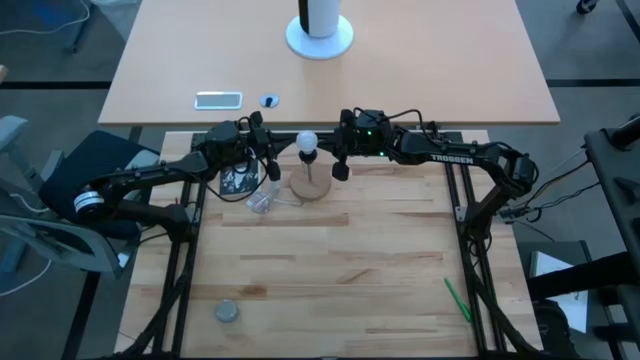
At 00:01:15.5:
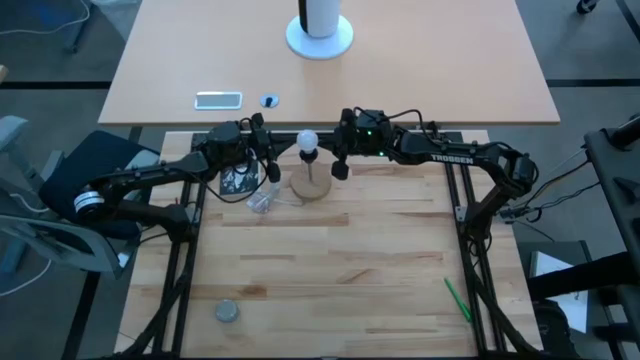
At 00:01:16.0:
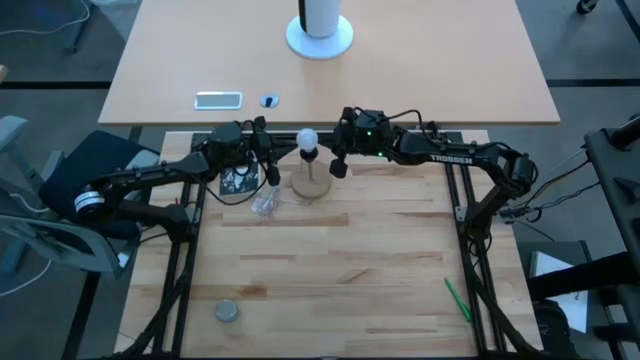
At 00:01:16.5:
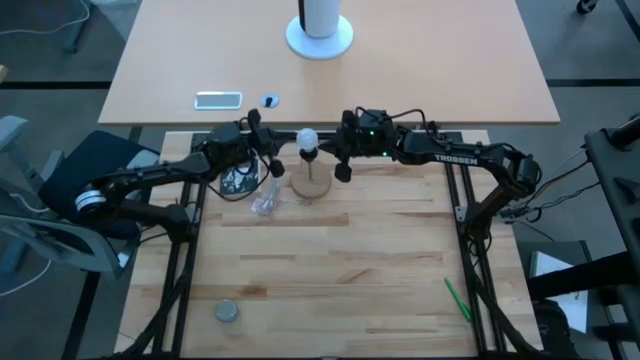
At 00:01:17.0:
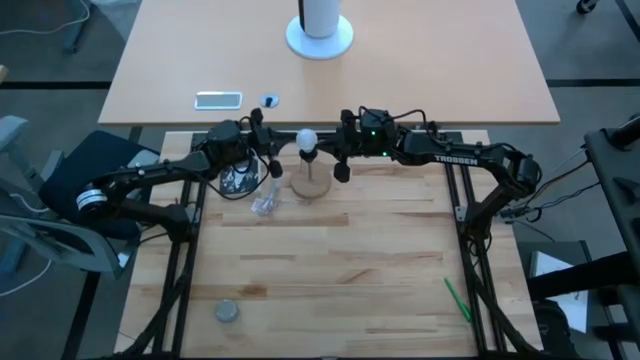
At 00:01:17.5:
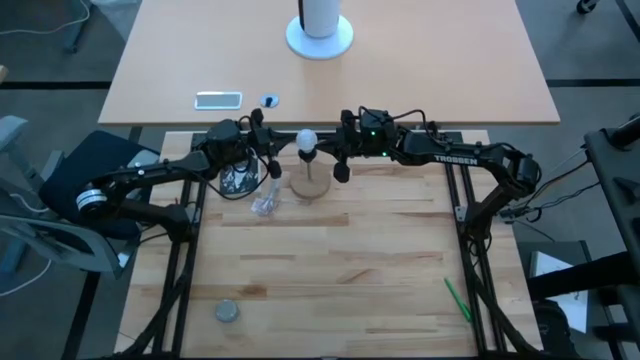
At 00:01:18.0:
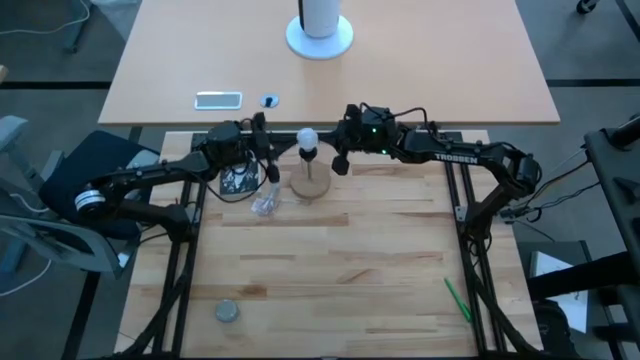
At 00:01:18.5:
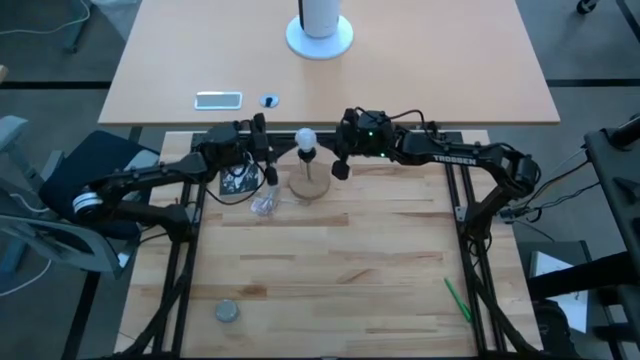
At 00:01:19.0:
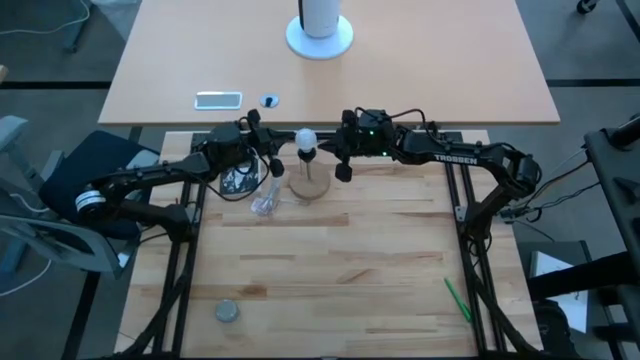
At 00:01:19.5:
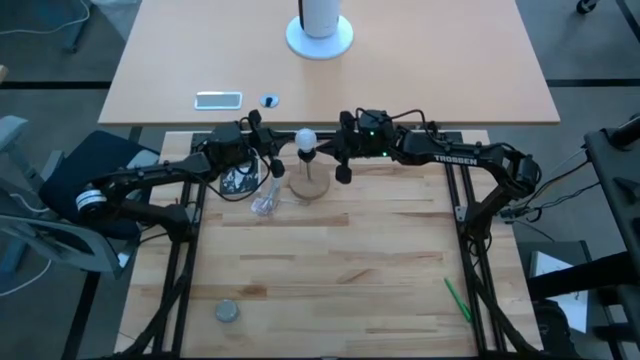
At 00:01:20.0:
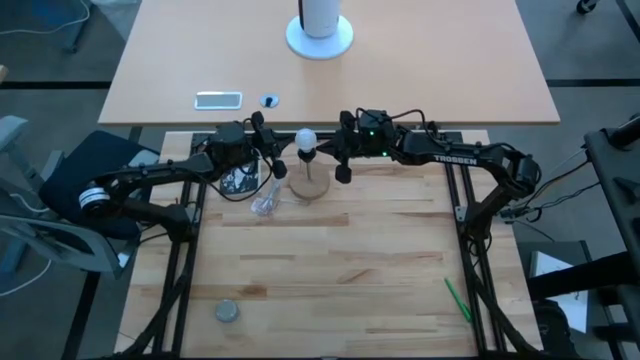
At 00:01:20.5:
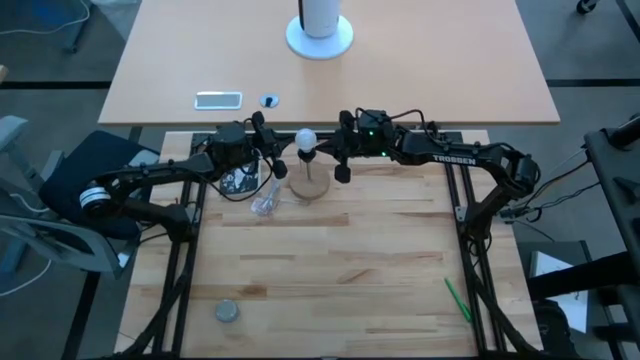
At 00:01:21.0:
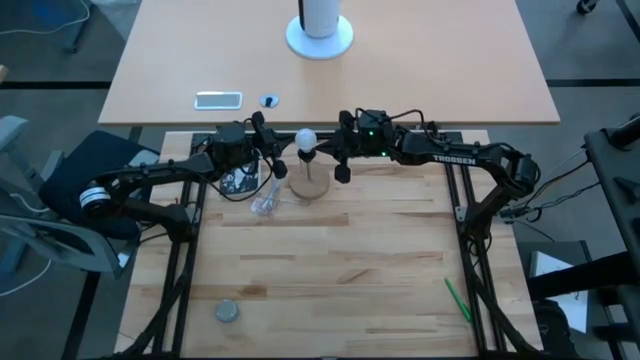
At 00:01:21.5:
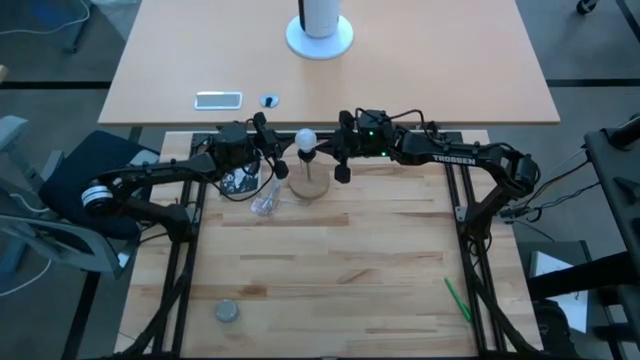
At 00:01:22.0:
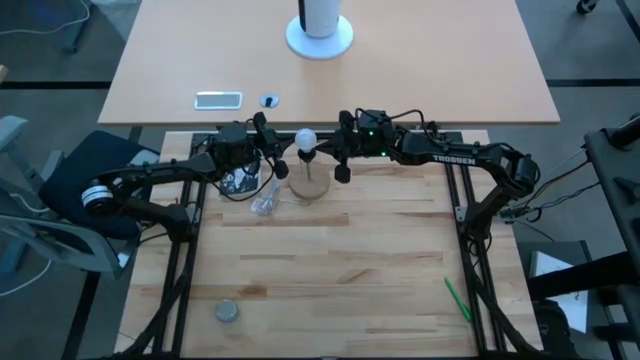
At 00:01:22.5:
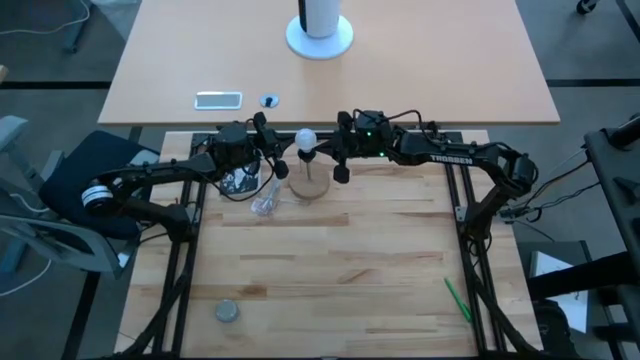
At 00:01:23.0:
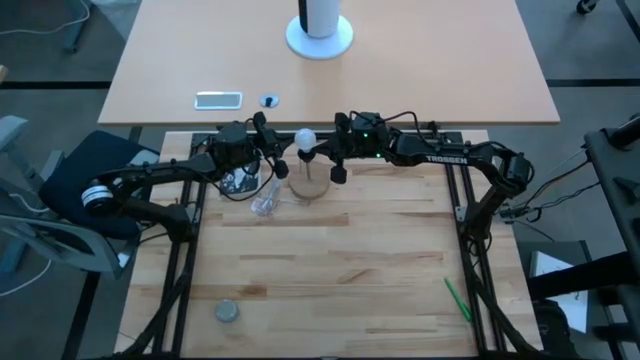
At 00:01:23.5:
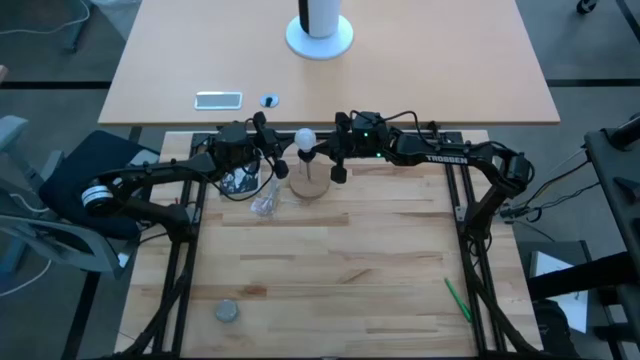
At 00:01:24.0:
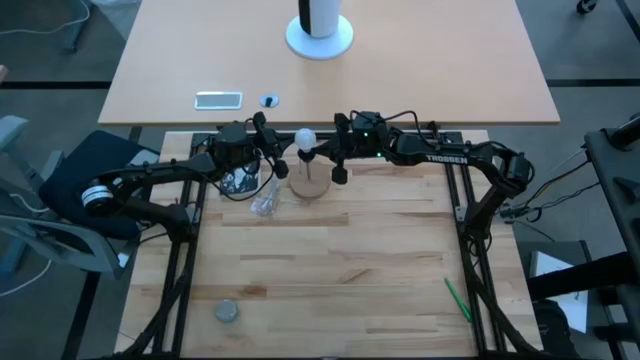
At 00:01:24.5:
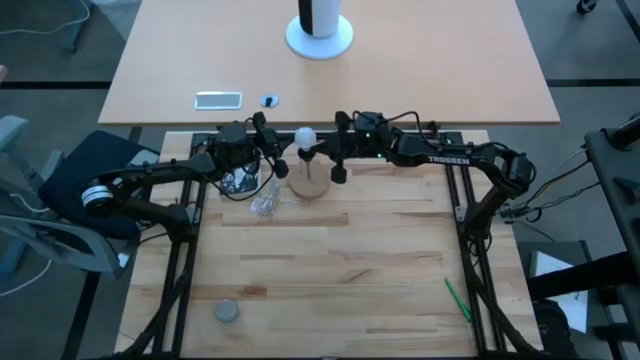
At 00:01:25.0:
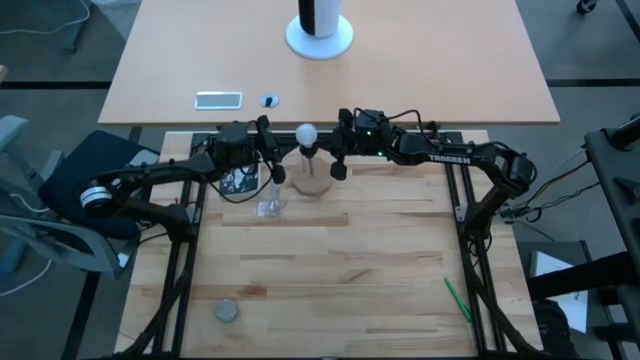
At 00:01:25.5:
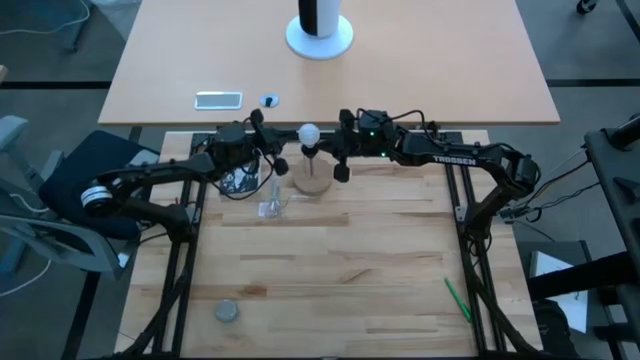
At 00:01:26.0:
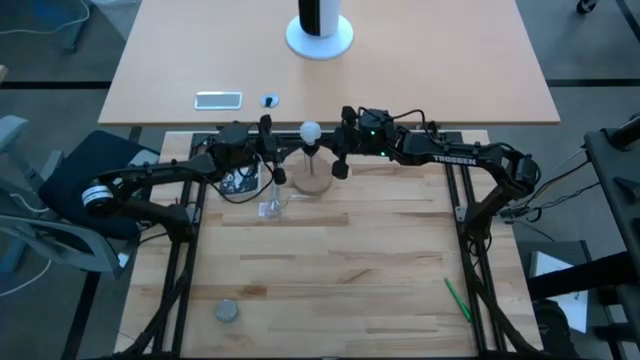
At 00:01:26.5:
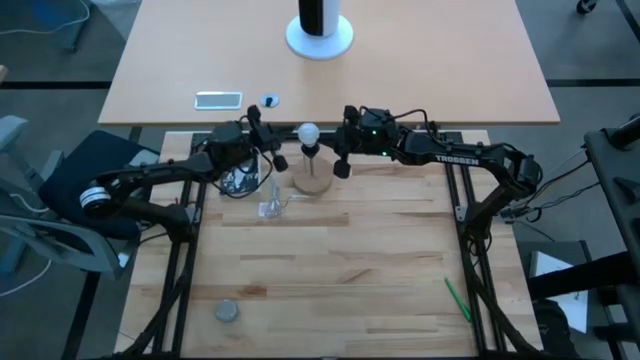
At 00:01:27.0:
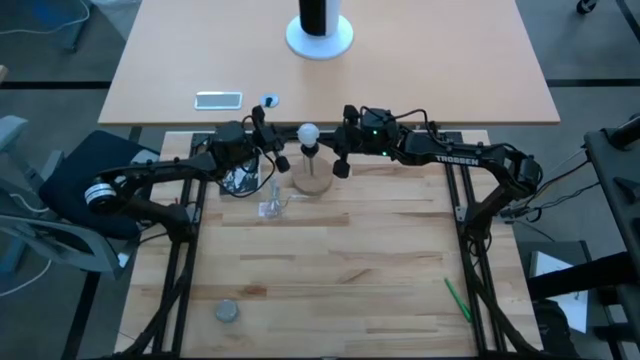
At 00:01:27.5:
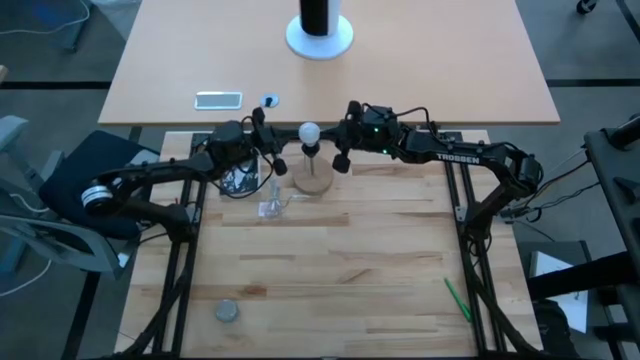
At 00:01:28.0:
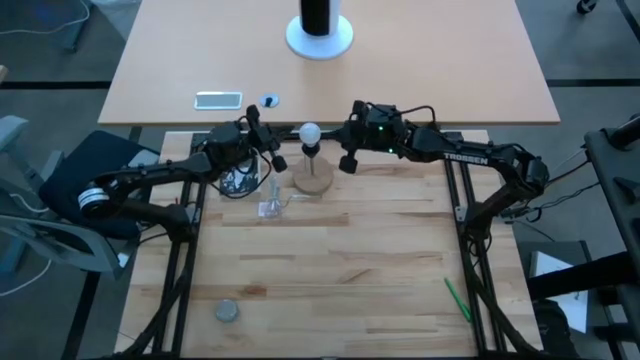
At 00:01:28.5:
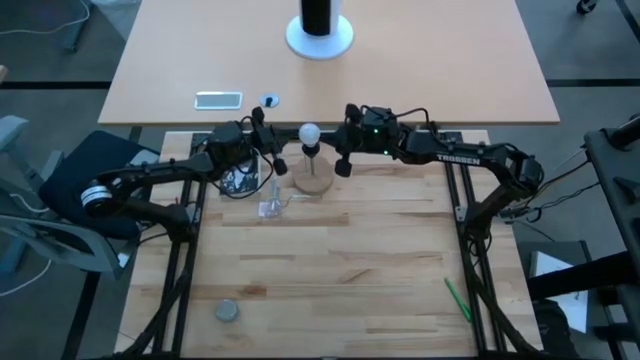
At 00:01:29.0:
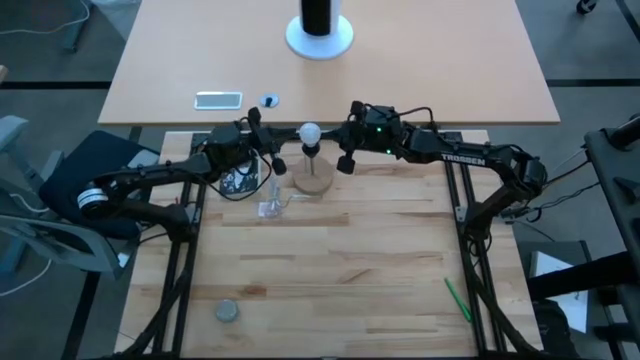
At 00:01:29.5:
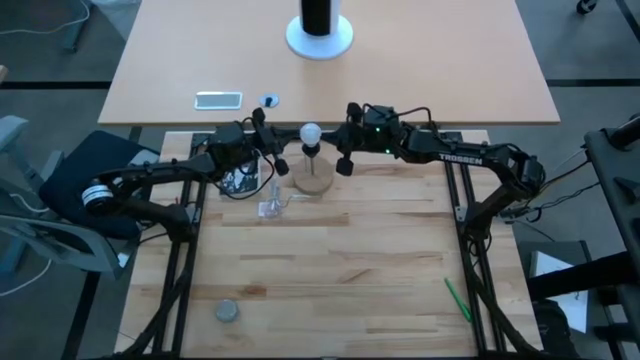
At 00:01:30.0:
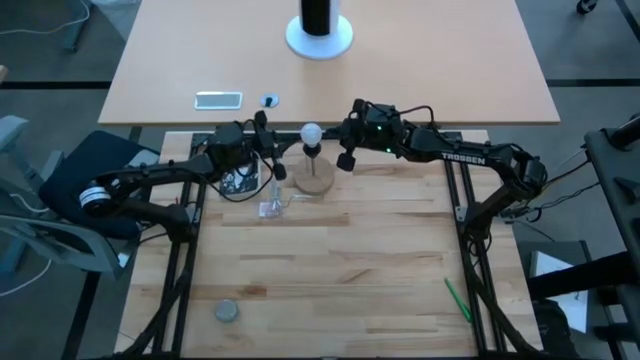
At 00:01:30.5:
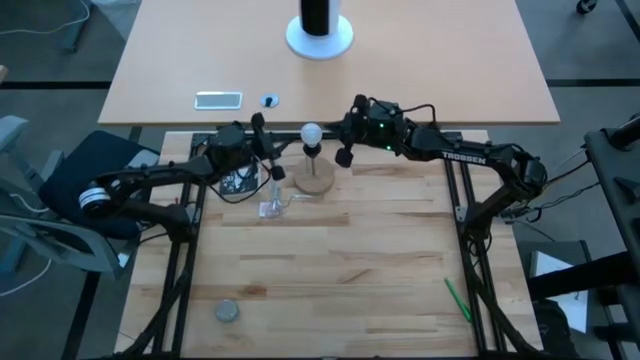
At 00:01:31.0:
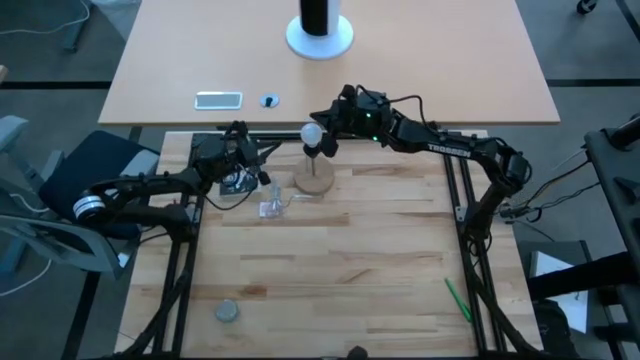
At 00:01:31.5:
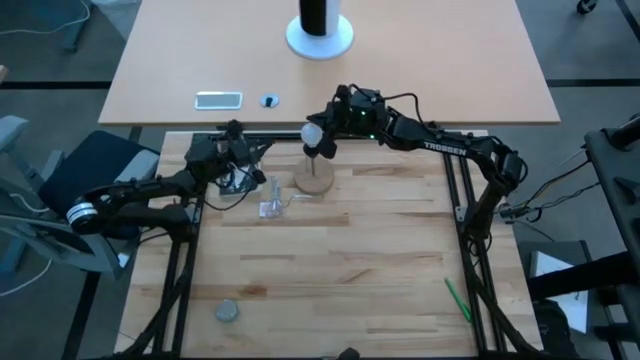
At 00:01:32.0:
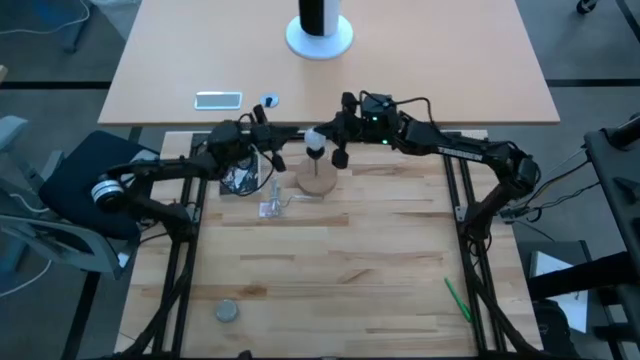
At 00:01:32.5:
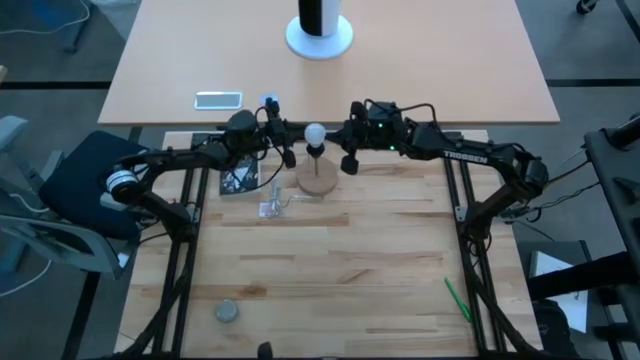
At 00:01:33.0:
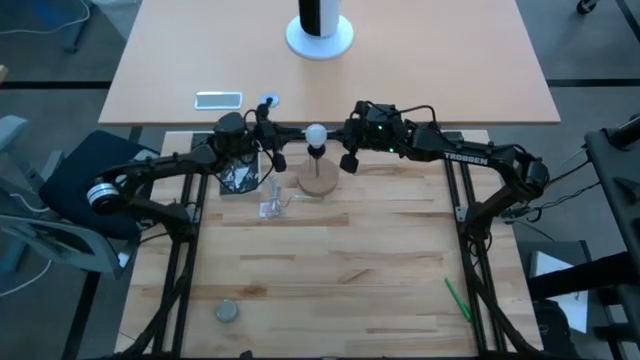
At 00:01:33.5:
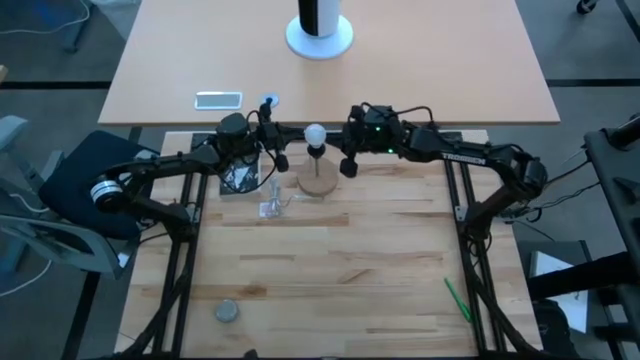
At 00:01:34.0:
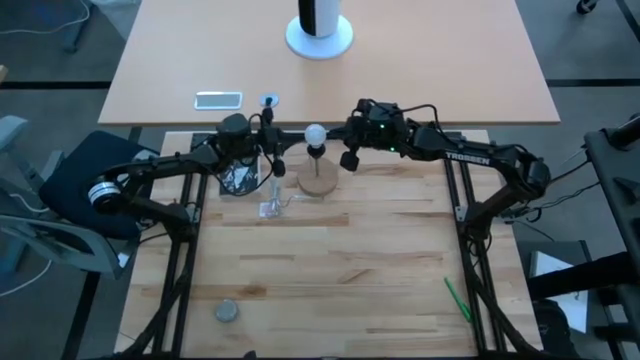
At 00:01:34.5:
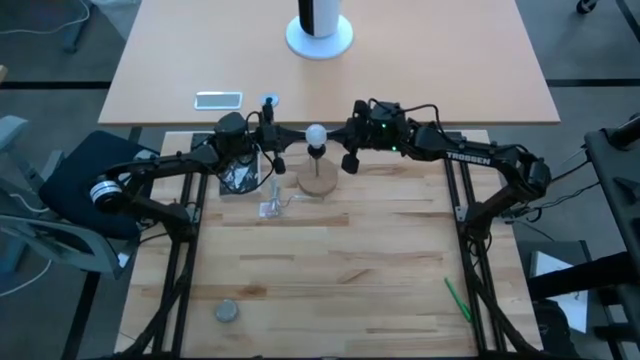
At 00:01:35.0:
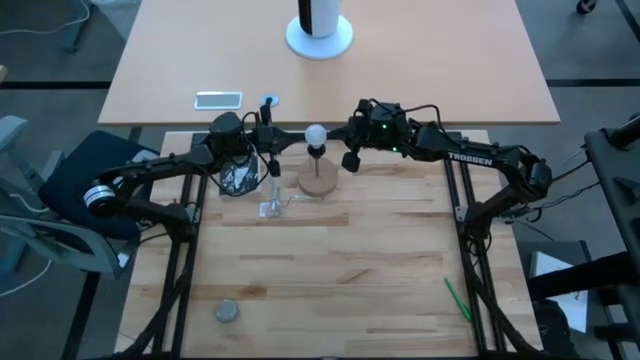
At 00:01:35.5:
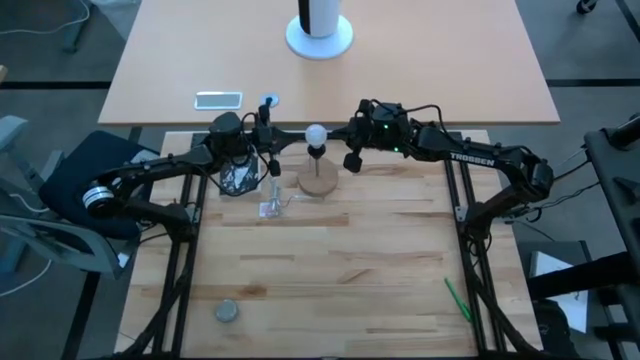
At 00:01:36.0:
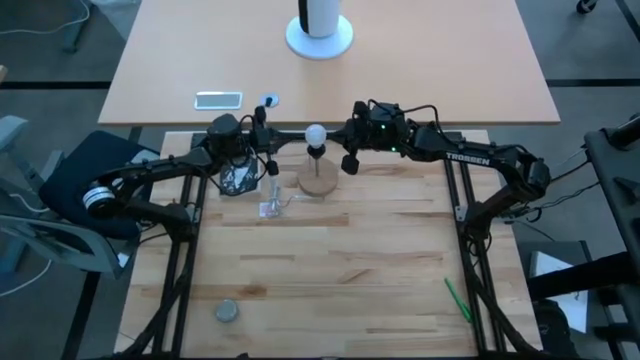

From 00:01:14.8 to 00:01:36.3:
Task: Screw lightbulb
Remove the lightbulb from the lamp
